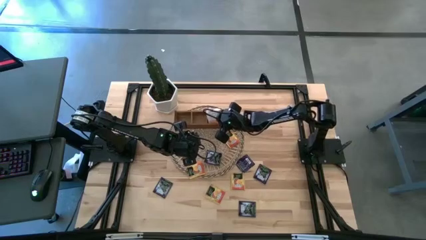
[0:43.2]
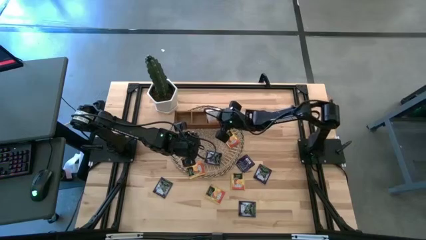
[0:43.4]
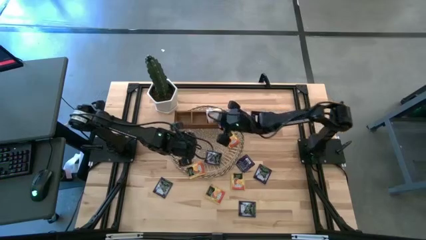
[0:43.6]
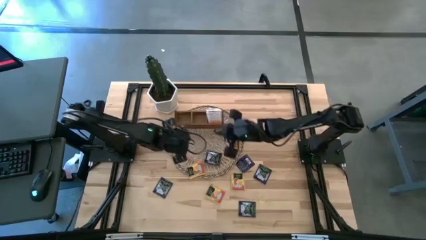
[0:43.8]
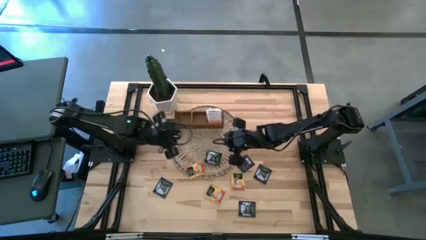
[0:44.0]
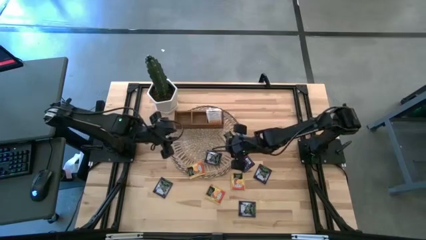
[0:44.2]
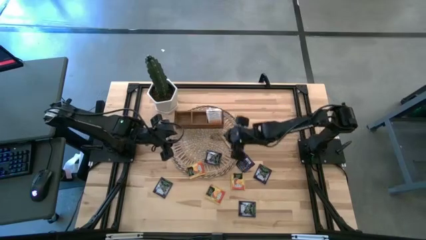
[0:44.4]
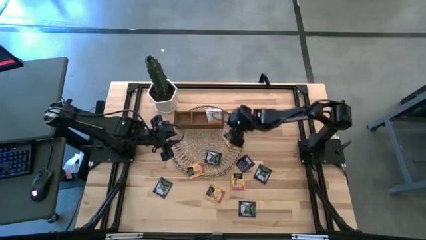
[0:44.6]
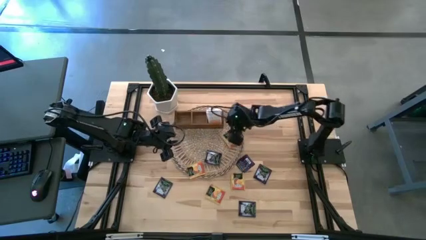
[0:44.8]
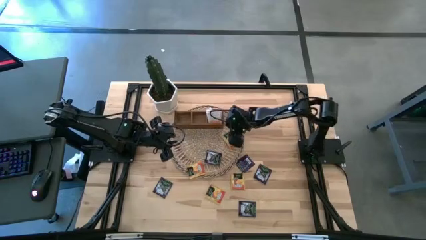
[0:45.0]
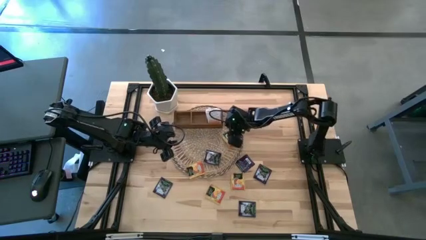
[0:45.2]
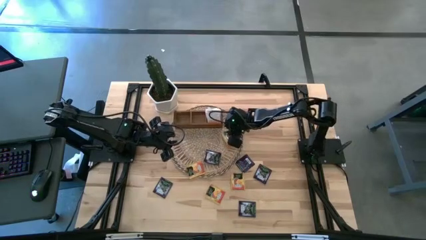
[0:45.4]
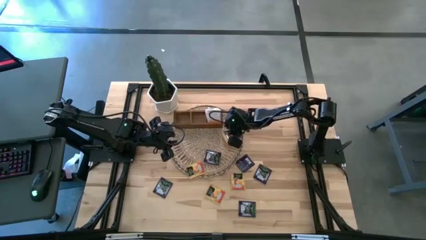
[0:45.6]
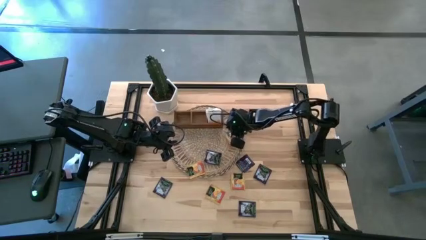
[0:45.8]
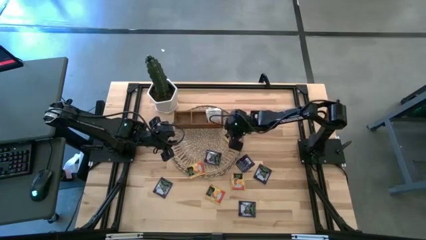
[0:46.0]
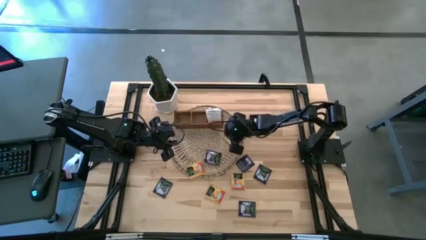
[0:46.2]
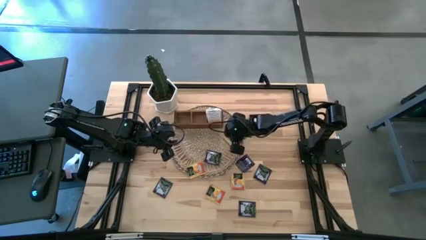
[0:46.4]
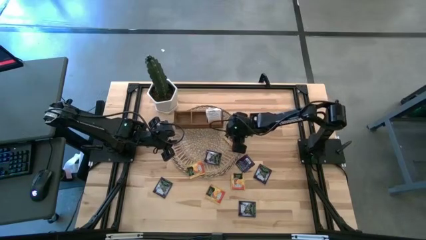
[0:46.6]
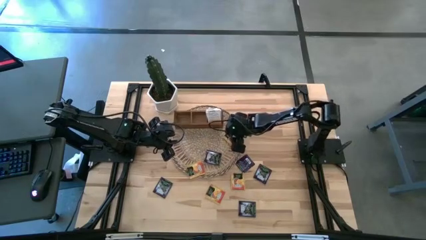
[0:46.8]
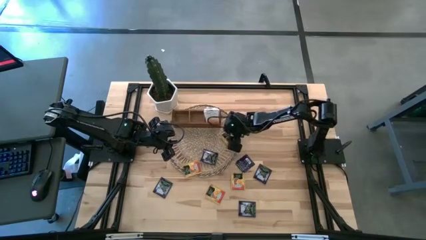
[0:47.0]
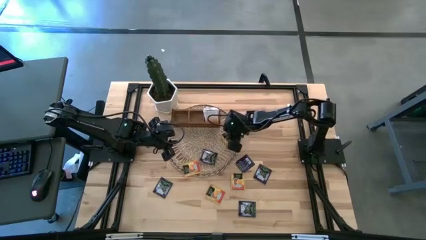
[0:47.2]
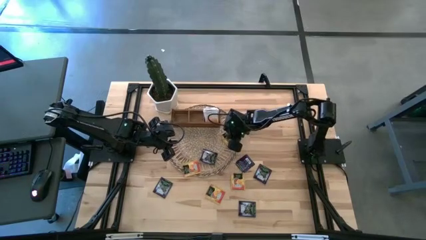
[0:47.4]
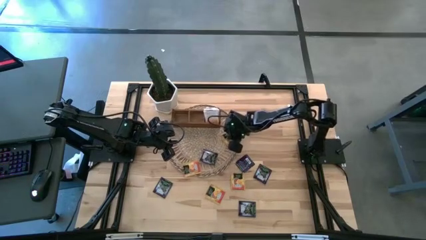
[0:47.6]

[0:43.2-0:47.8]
Task: Pick & Place Tea
Put the orange tea bag into the middle section of the wooden organizer

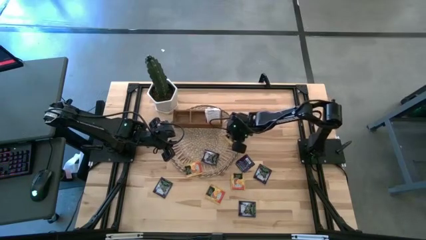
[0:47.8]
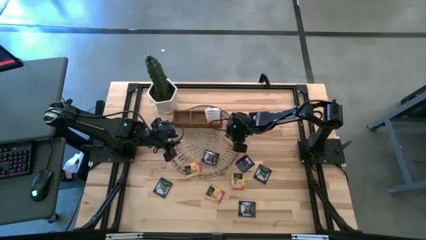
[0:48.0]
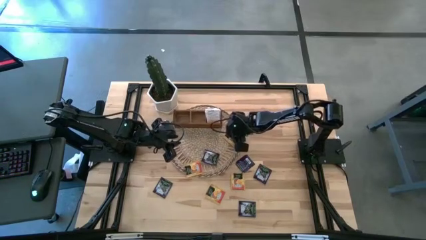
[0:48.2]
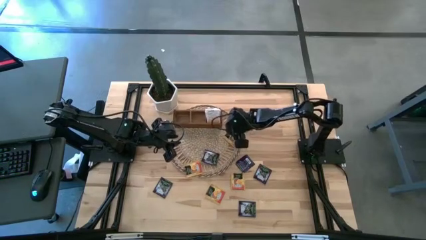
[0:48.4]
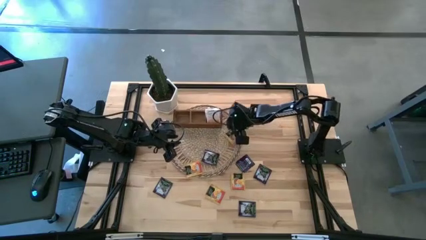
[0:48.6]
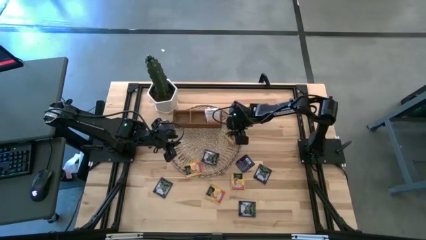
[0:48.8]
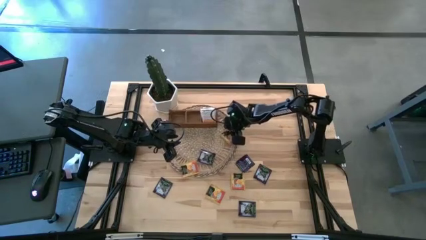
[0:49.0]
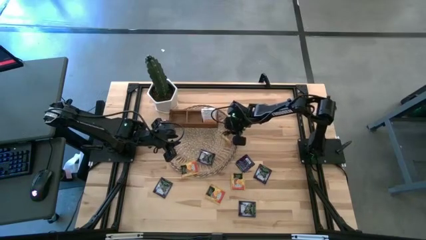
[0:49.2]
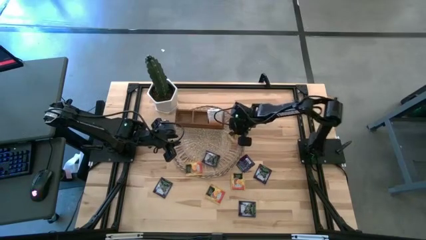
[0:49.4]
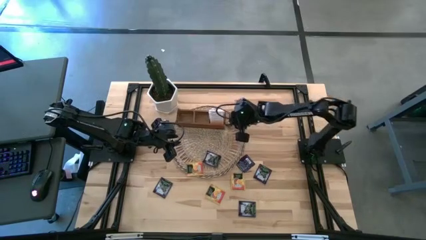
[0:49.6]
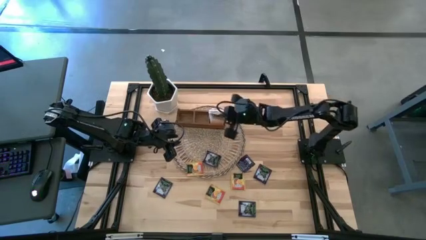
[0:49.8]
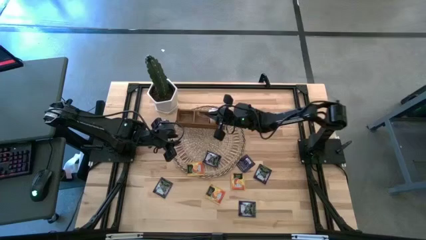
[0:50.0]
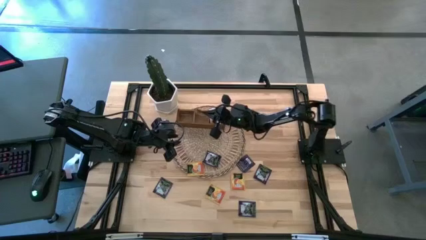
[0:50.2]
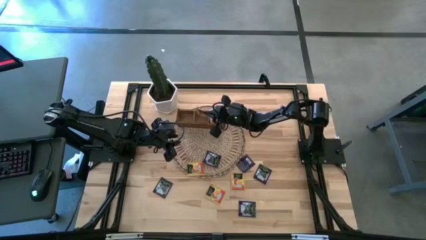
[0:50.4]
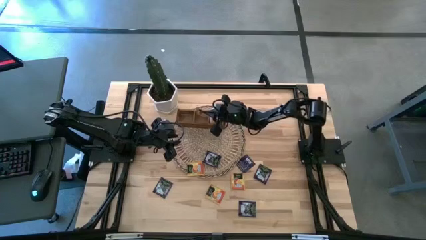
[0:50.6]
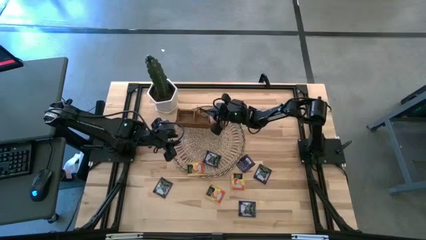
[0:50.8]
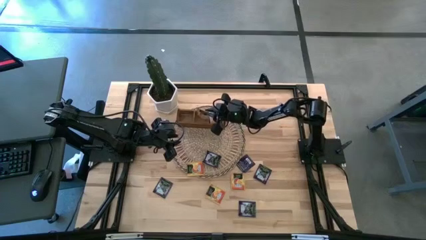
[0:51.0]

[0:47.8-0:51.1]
Put the orange tea bag into the middle section of the wooden organizer

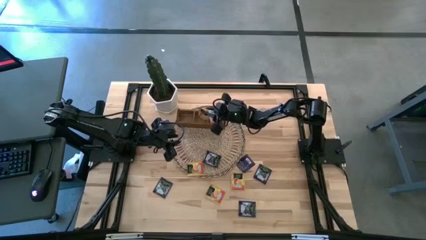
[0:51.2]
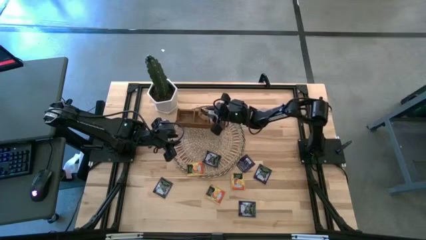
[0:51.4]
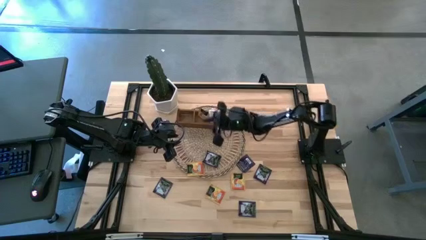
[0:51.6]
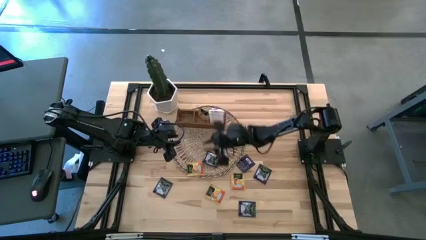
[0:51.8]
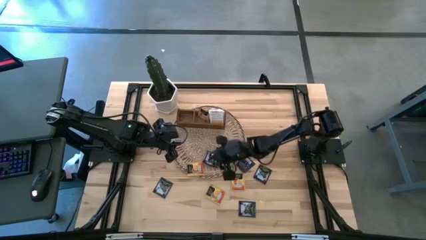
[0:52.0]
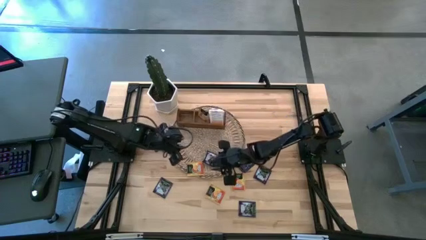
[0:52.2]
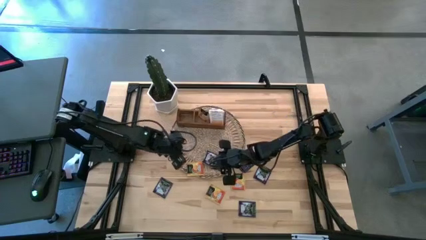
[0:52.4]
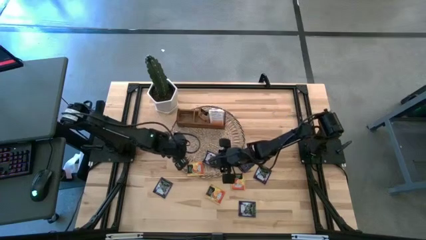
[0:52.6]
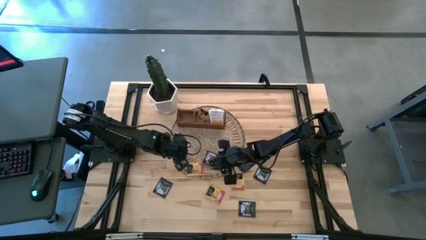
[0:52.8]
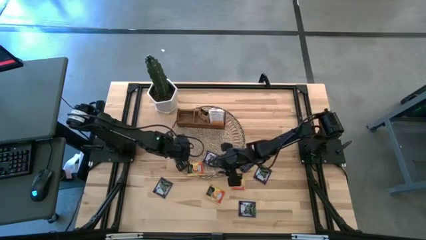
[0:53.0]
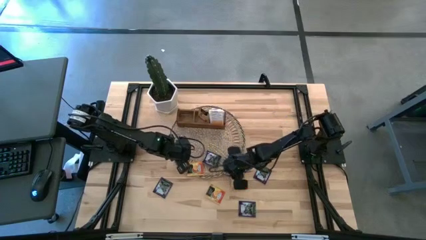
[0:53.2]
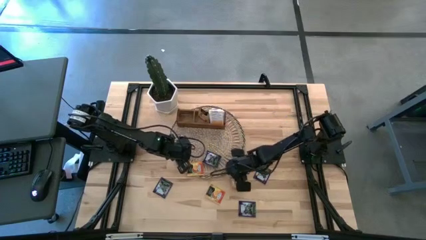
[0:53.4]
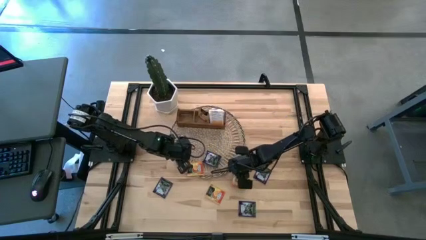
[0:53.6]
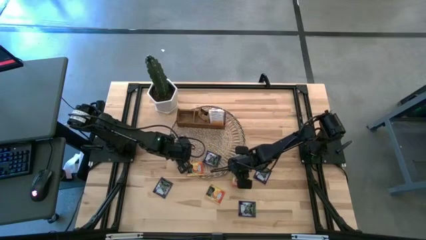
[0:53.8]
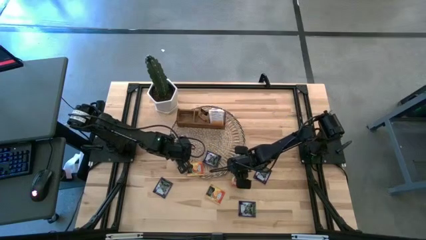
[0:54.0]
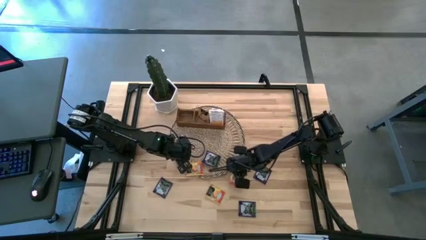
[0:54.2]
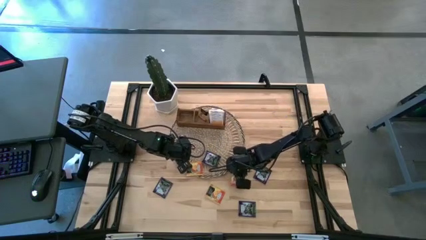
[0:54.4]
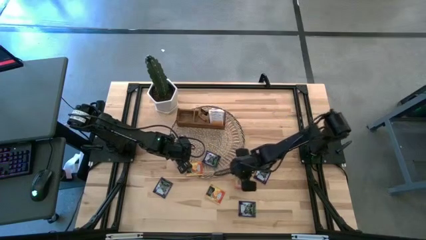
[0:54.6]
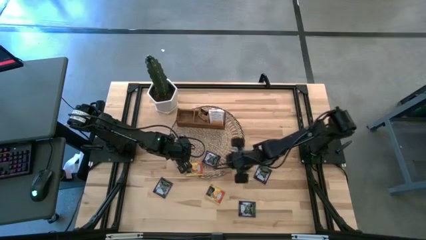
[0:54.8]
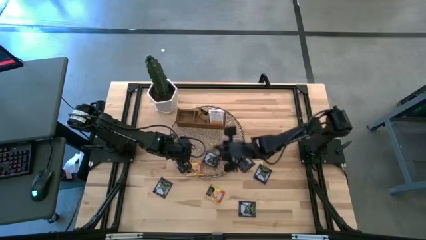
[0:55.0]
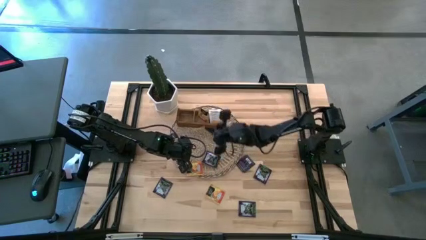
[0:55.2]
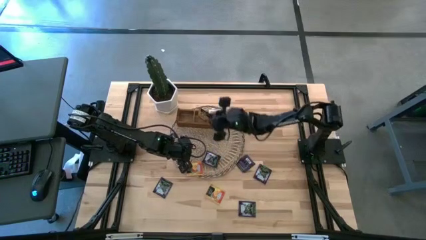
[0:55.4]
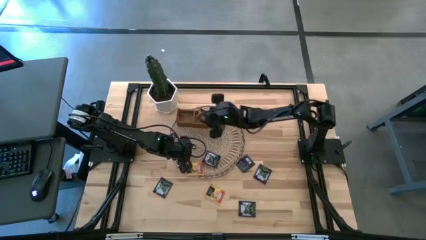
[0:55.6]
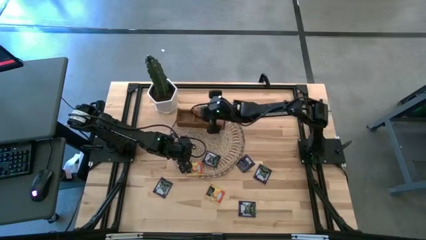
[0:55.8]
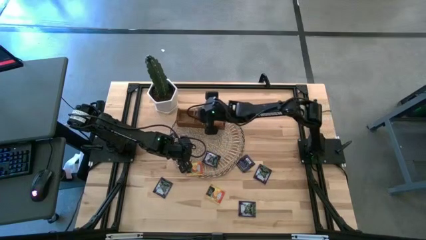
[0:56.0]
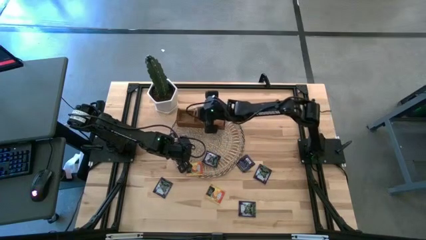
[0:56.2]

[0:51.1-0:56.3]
Put the orange tea bag into the middle section of the wooden organizer

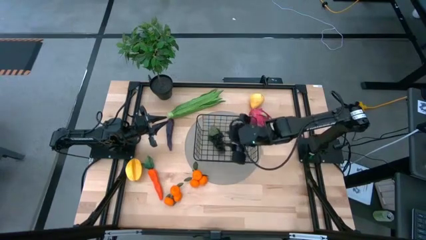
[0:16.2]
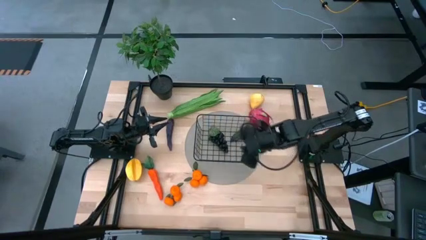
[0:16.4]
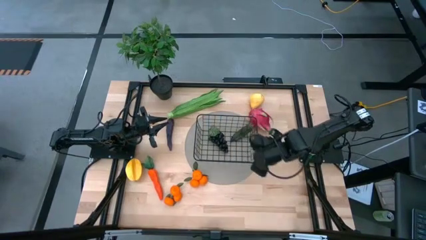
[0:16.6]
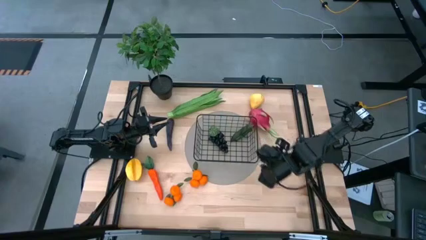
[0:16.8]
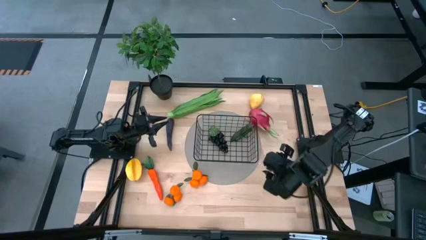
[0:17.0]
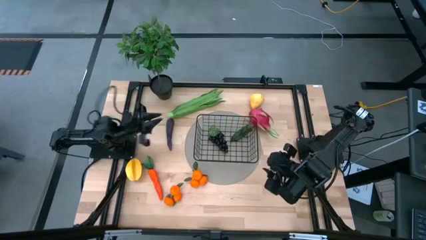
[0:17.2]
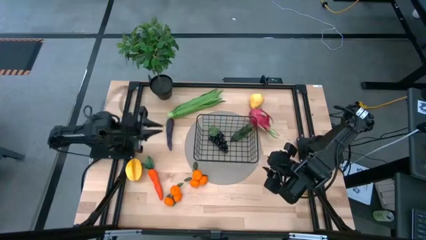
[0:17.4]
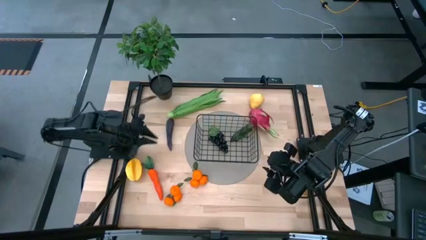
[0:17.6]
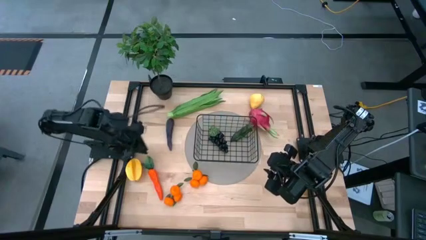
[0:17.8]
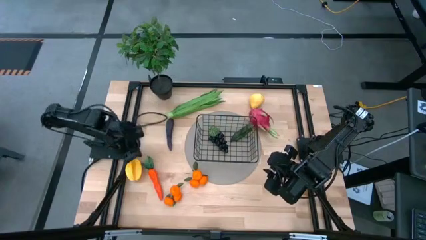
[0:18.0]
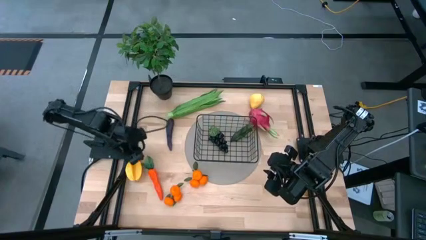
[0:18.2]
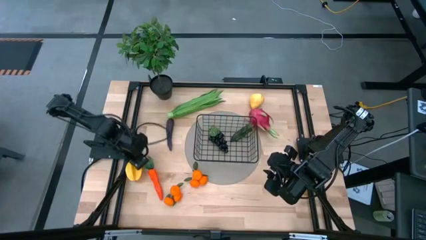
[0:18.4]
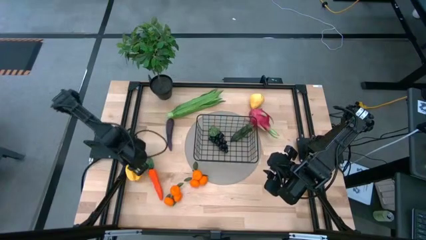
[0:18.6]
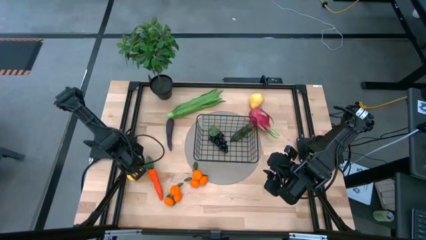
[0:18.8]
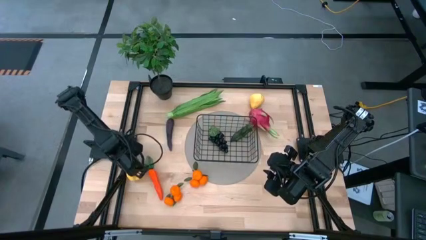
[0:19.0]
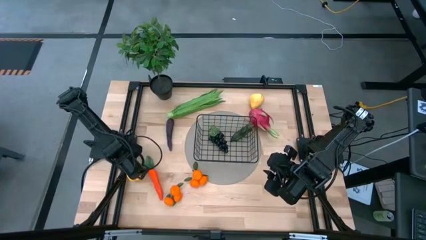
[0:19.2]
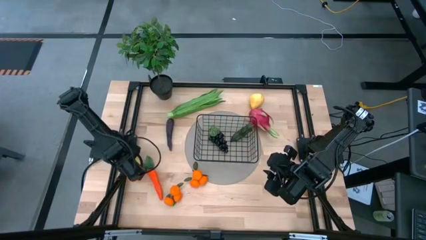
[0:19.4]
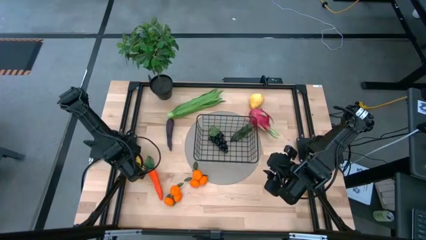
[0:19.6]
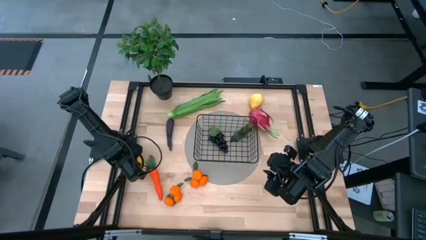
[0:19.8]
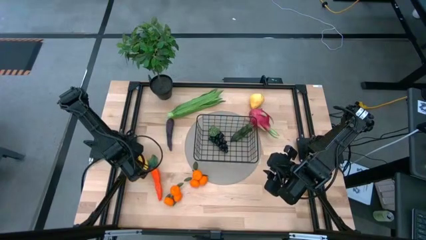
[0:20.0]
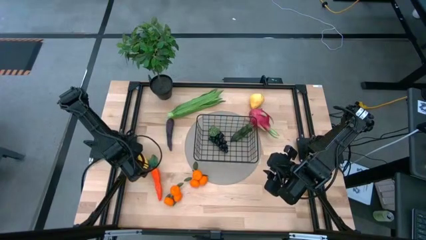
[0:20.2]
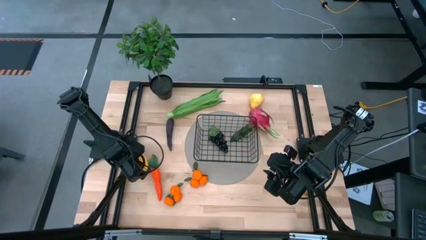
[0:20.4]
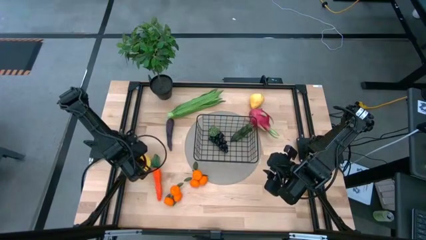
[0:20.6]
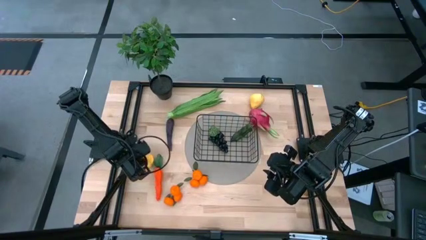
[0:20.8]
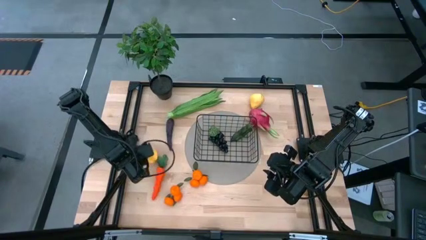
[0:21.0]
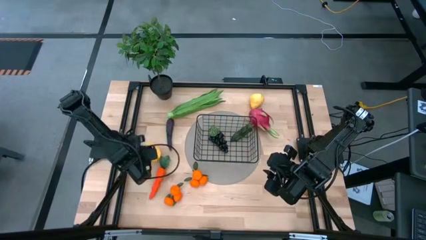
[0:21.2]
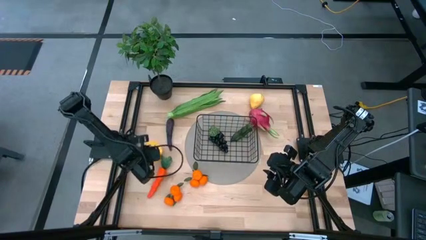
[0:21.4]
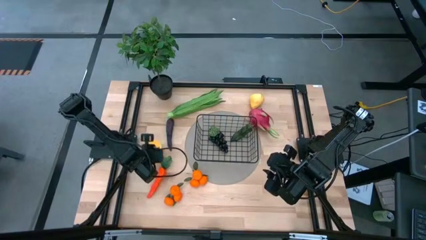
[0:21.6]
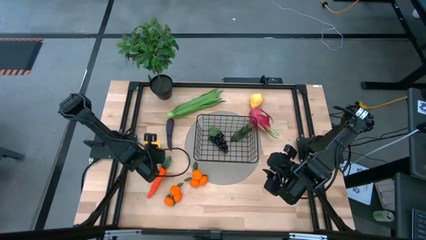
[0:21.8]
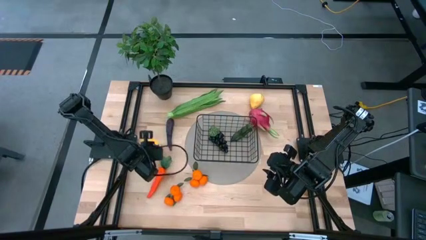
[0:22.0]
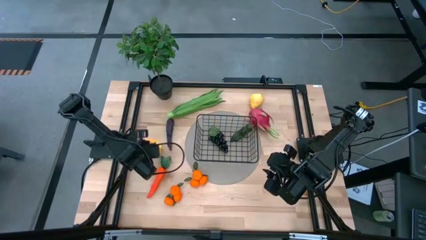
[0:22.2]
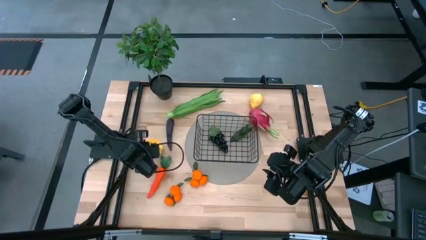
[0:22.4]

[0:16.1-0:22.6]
Task: Build produce basket
Put the yellow star fruit into the black wire basket
